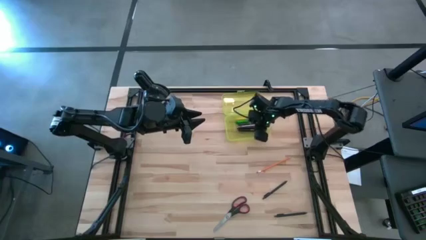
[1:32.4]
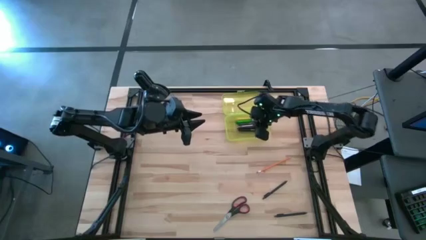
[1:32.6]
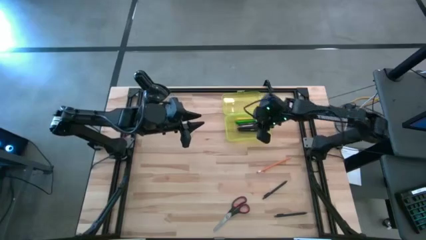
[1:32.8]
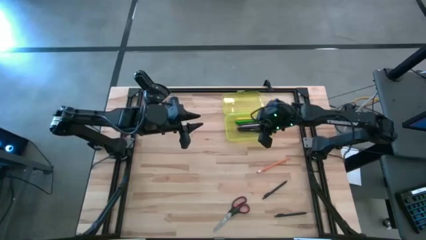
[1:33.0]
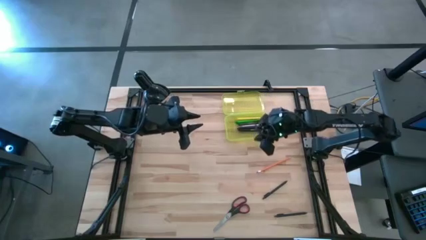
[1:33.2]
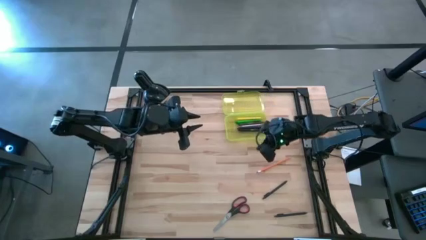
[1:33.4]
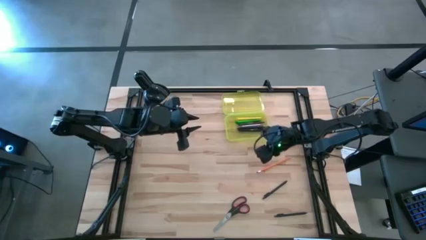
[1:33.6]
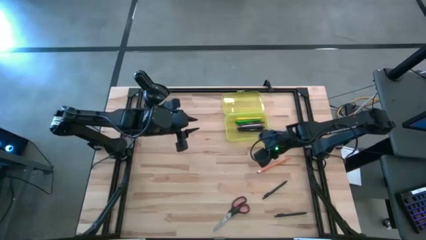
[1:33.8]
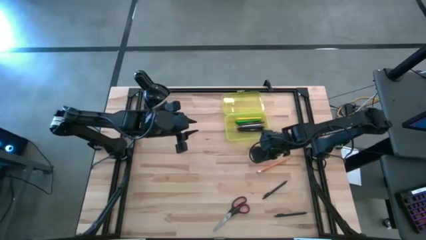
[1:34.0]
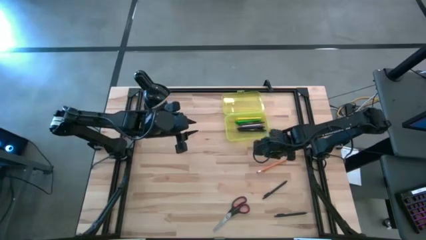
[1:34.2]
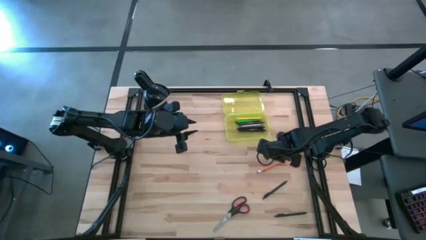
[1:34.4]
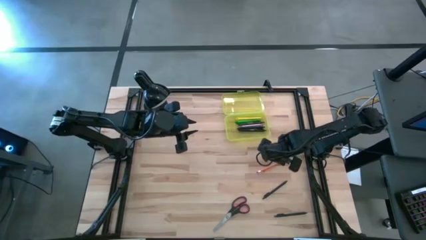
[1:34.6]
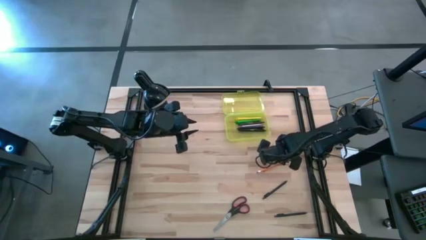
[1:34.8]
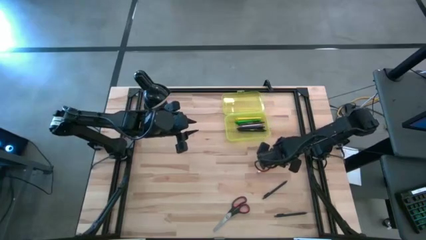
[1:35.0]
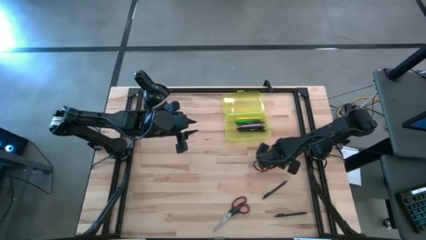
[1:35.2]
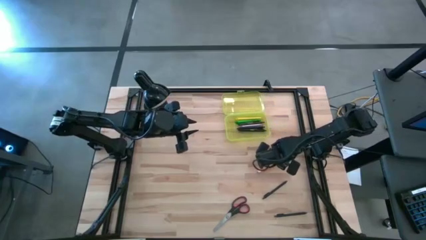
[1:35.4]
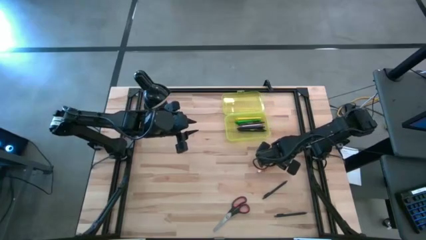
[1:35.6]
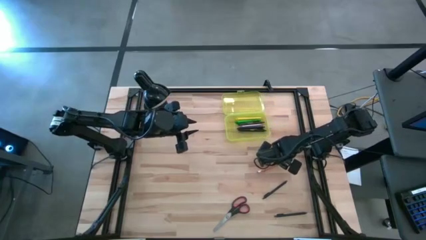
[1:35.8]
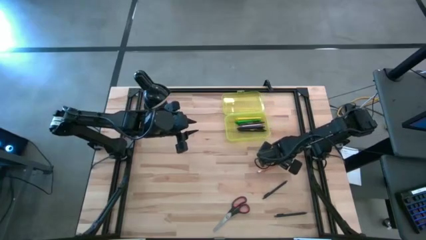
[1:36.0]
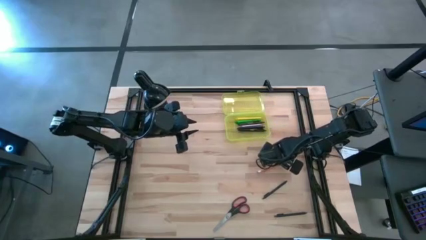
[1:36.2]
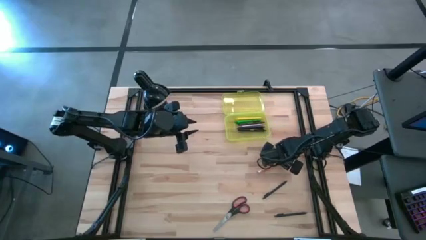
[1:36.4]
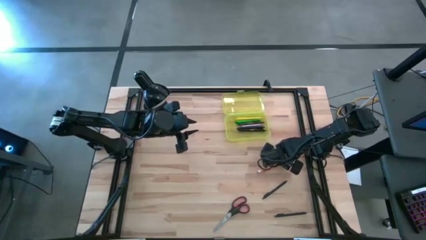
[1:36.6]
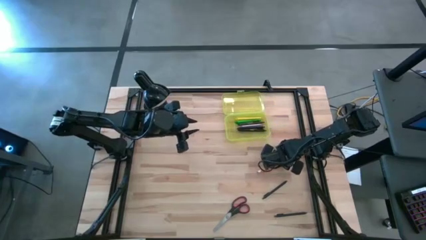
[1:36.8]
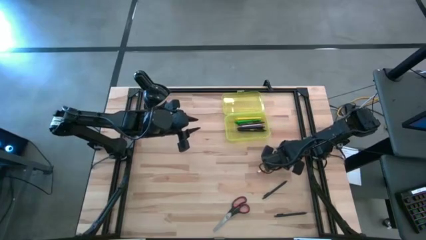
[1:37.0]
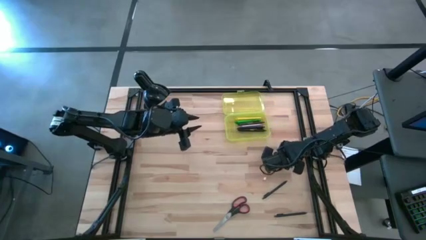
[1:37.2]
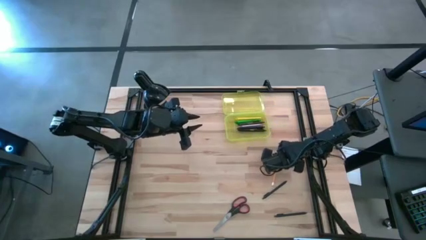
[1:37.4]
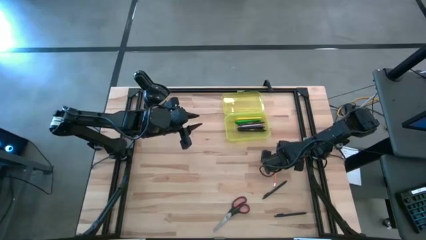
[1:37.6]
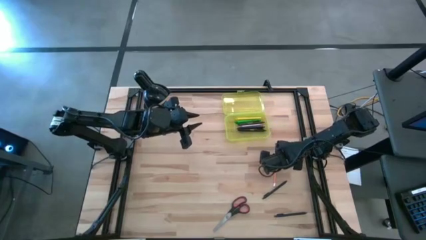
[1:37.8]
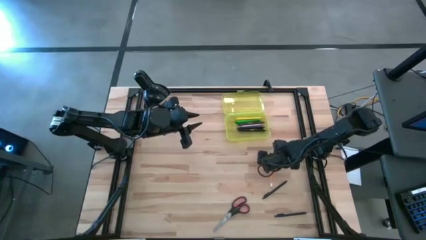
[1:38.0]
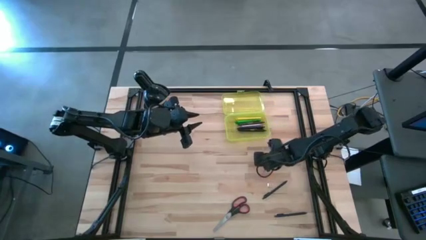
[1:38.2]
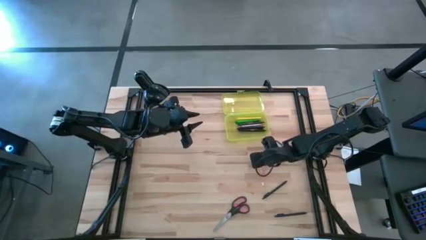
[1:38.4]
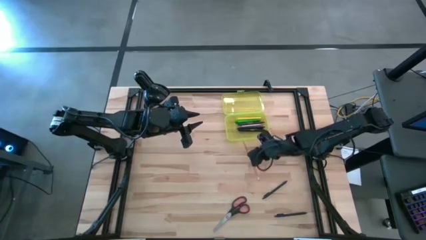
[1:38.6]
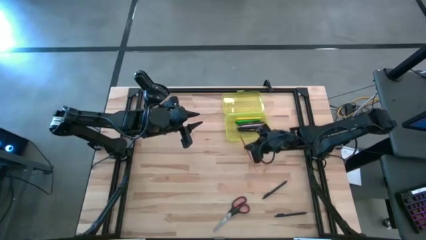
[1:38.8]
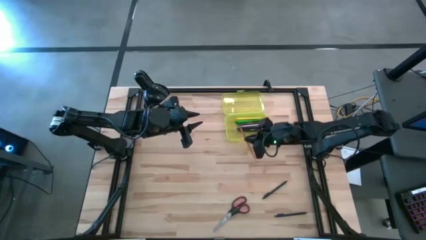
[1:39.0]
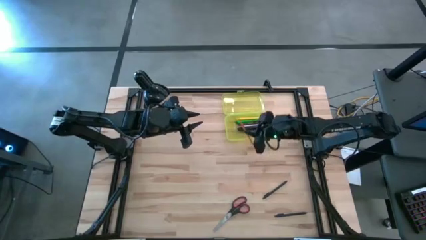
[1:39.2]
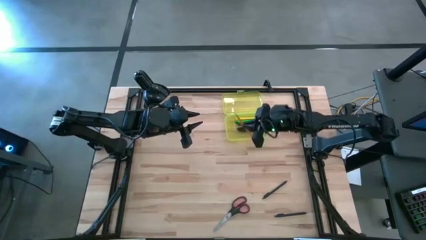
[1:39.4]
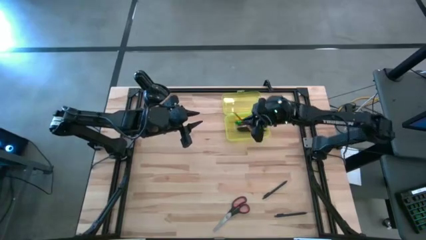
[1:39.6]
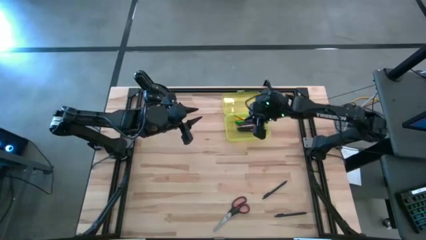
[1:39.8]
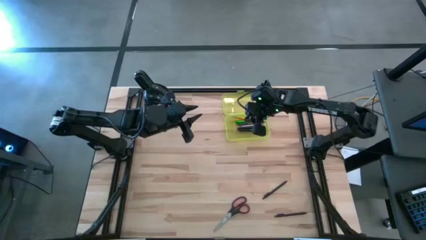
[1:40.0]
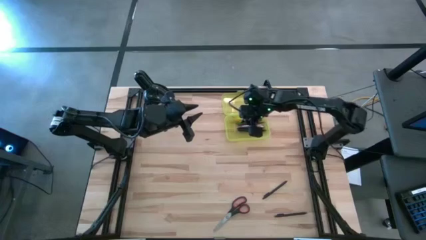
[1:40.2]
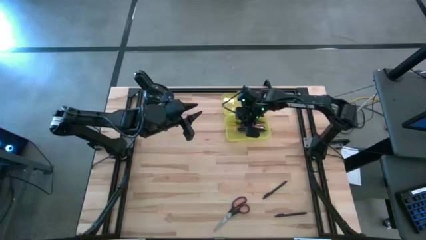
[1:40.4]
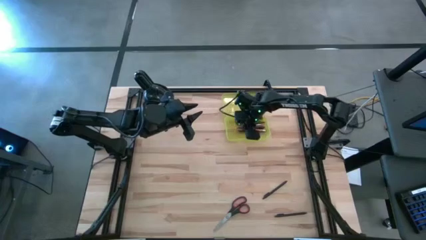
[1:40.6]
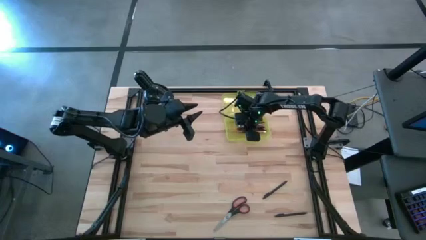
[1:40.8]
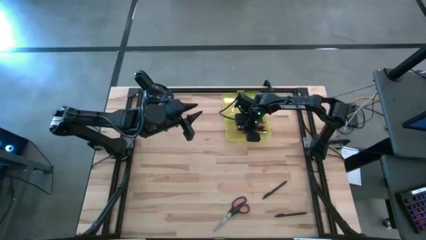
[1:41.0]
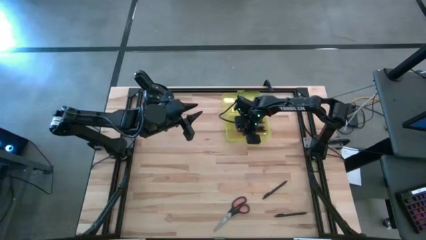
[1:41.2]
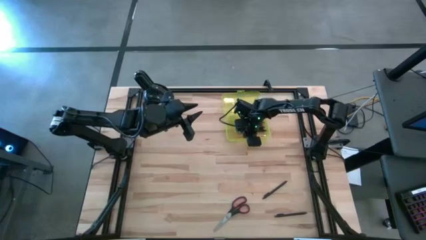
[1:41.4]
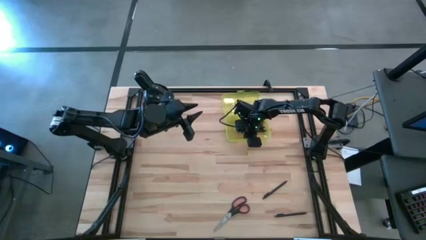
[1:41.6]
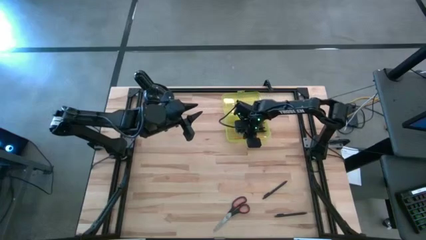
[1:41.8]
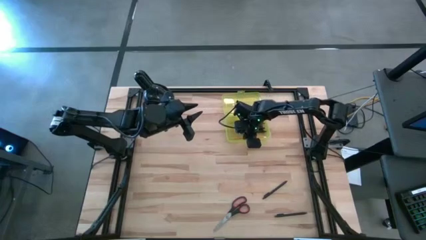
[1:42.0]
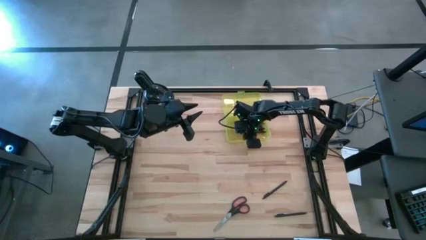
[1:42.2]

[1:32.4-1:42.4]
Task: Pick & place school supplies into a supply box
Put the pencil into the supply box

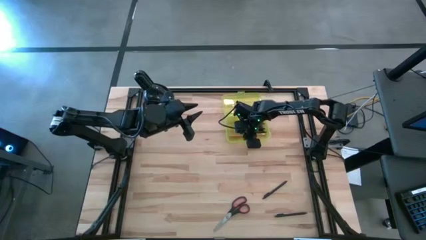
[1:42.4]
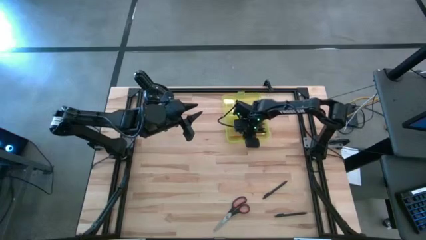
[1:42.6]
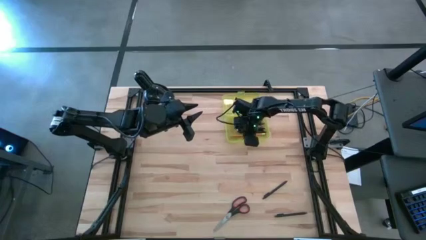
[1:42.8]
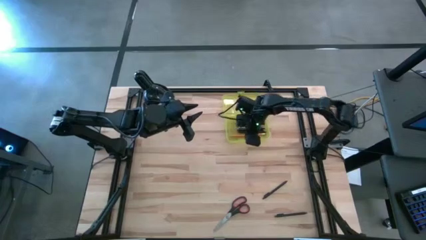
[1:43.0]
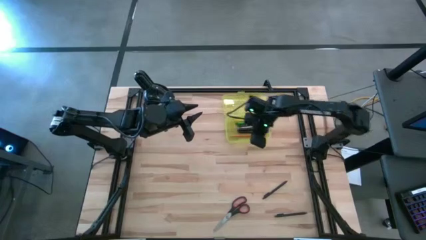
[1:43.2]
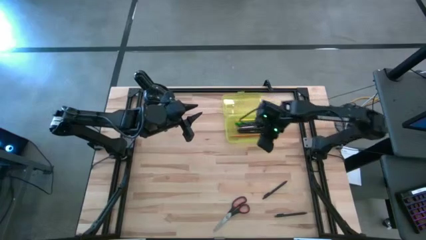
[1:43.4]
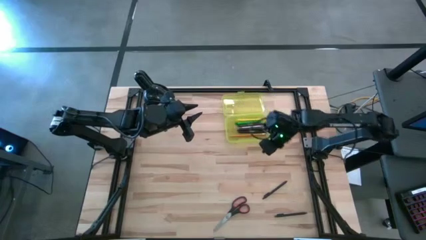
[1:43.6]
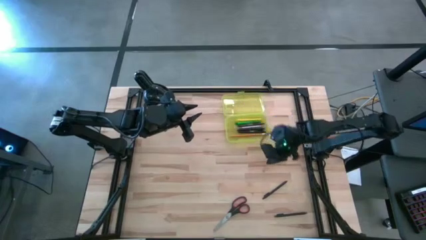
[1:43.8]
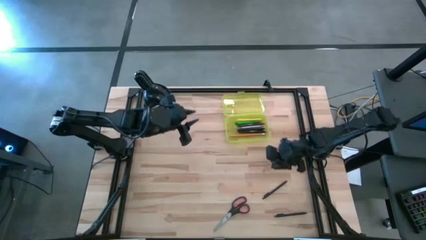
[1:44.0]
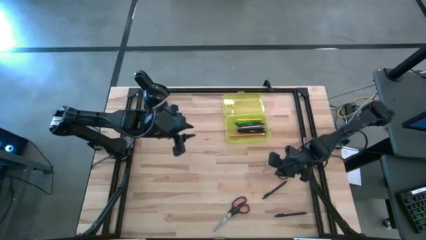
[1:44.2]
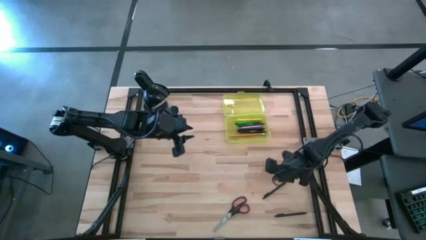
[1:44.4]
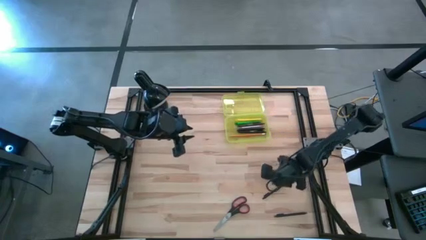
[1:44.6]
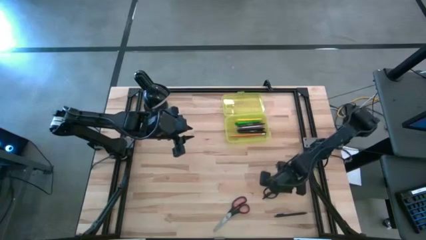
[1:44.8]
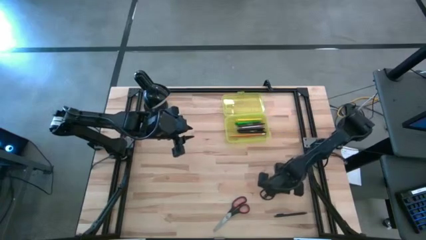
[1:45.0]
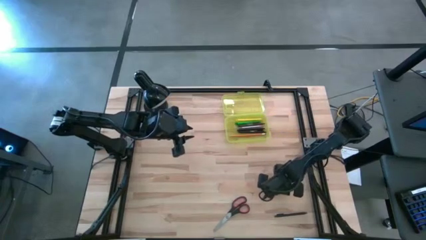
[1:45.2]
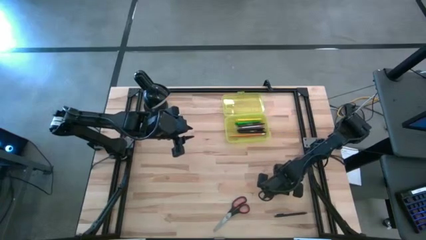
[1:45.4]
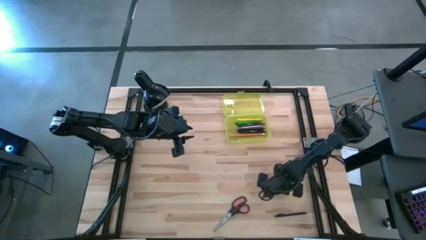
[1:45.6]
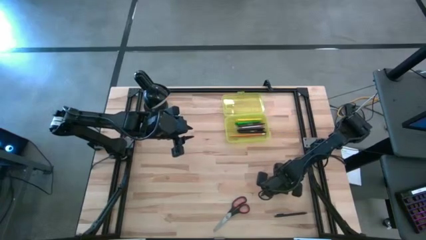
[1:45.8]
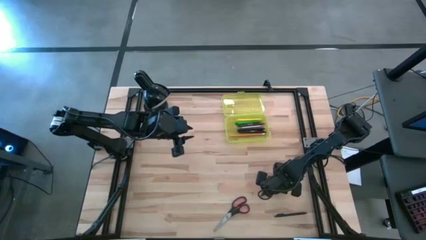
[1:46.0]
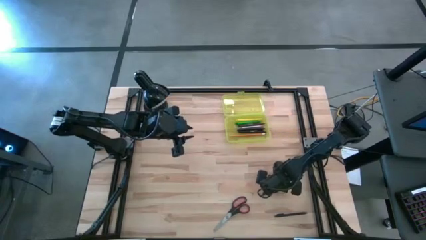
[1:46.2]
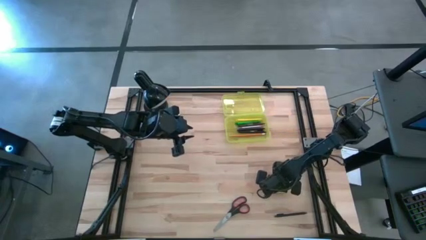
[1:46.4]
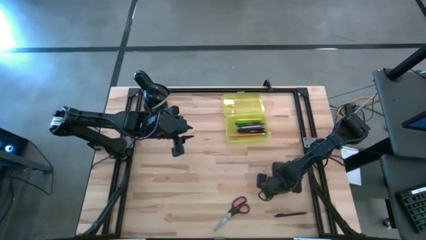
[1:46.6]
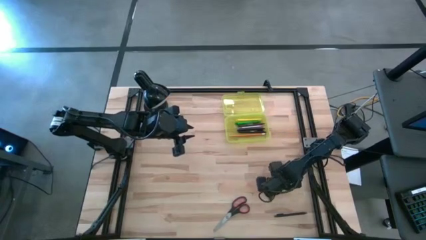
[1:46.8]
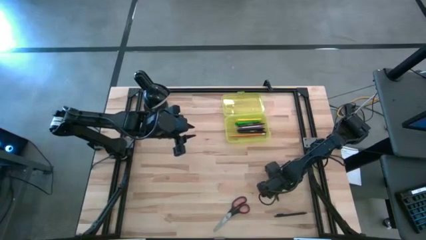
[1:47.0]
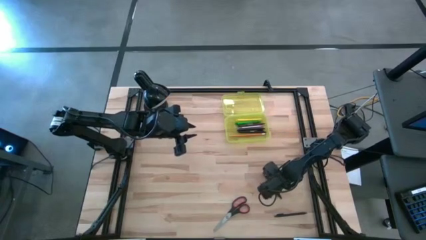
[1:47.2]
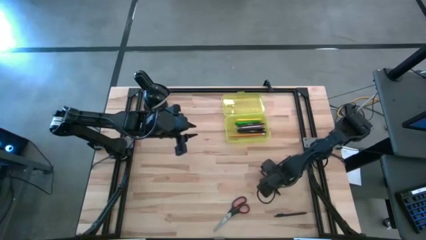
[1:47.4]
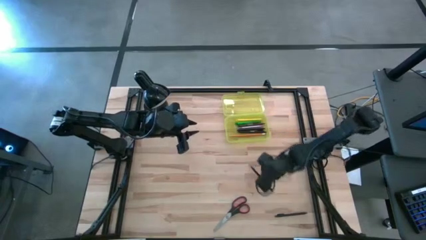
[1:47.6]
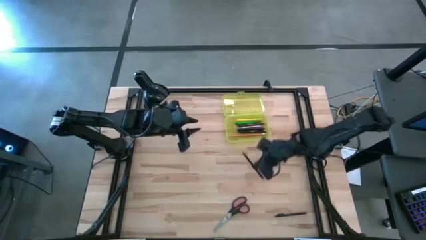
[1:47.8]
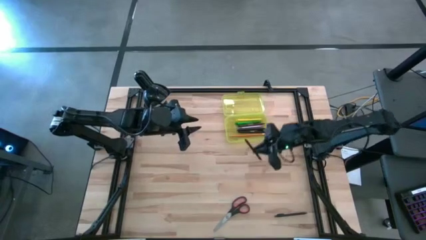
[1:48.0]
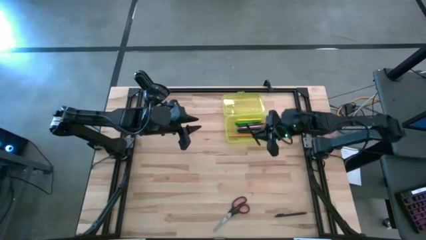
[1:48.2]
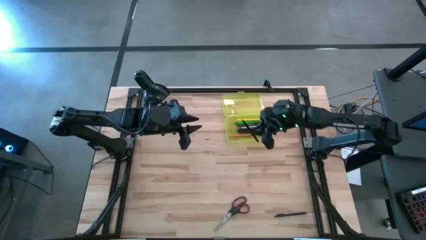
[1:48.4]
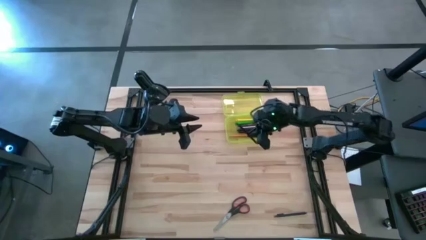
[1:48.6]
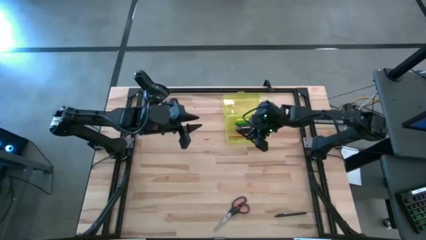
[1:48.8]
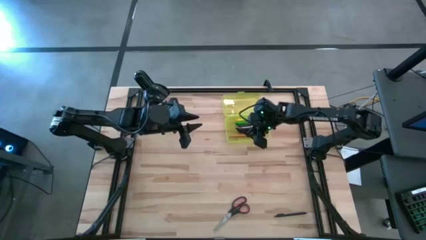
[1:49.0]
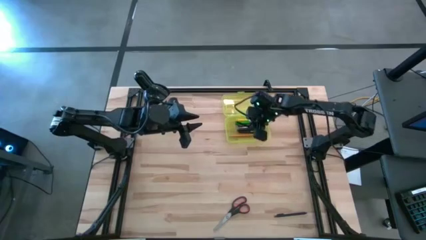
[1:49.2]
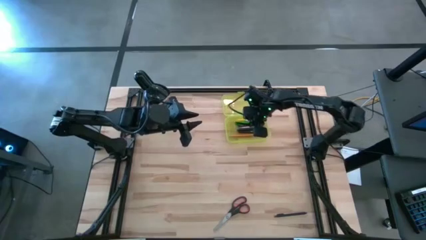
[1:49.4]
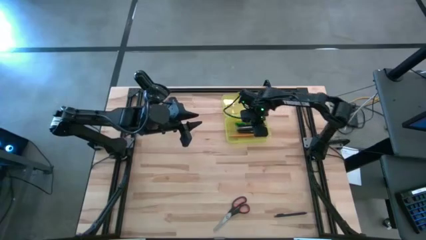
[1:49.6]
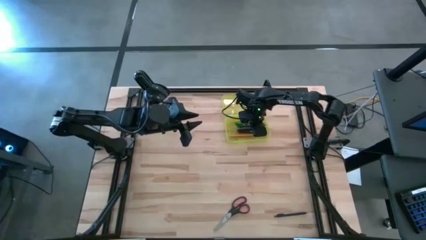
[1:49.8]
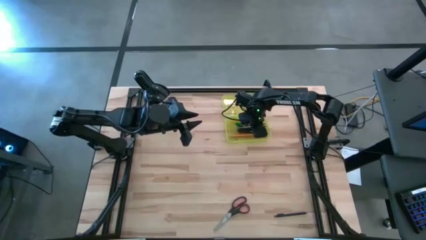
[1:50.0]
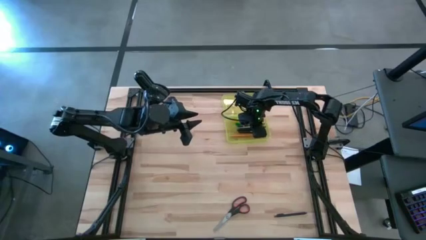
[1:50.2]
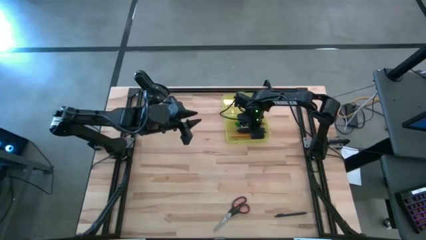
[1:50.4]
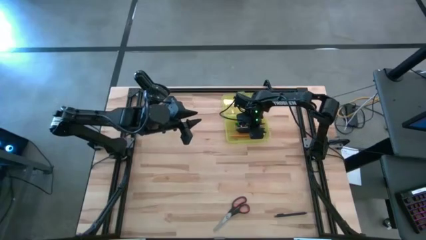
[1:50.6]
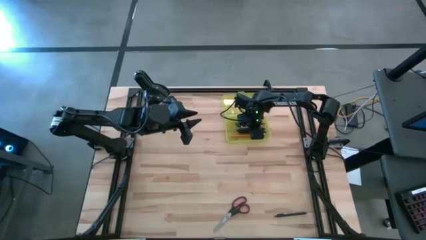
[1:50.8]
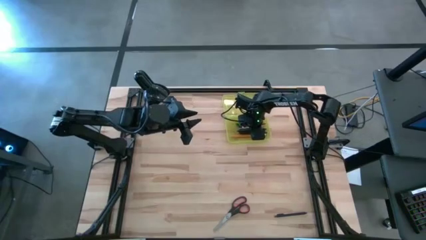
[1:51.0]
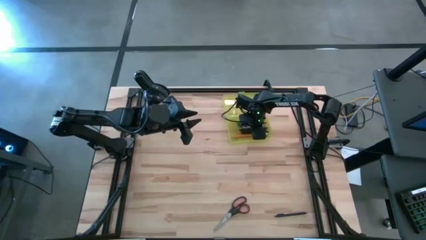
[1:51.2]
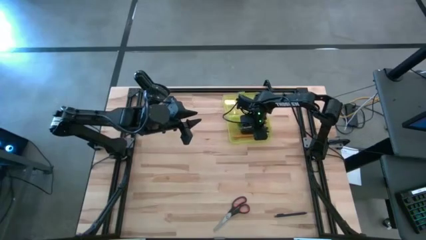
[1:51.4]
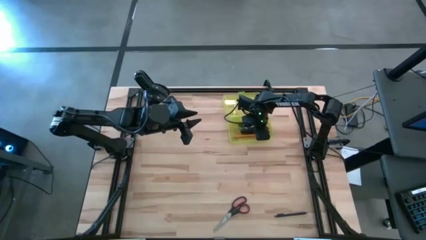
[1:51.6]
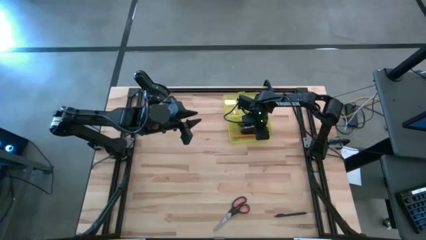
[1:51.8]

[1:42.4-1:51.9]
Put the black pen into the supply box
